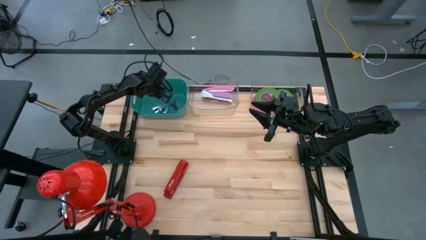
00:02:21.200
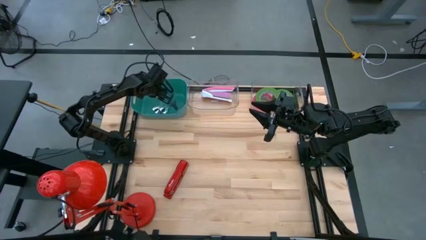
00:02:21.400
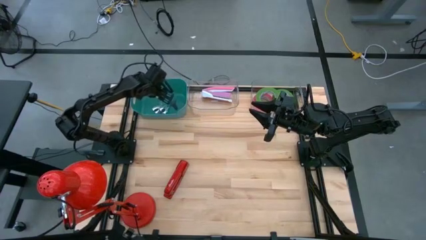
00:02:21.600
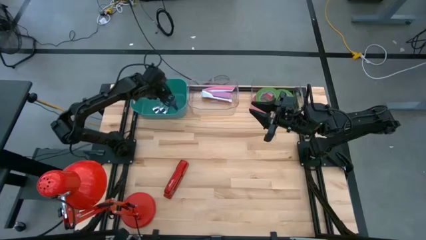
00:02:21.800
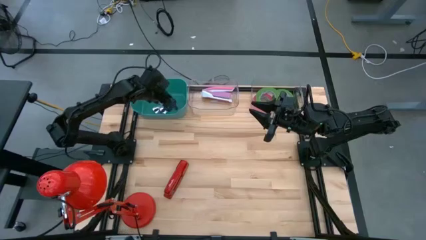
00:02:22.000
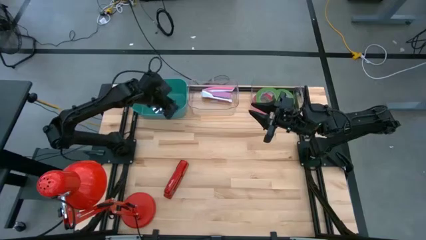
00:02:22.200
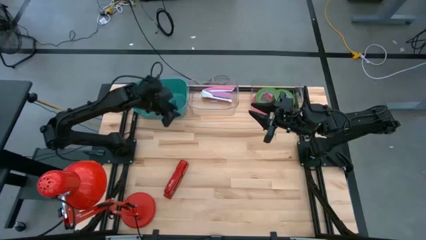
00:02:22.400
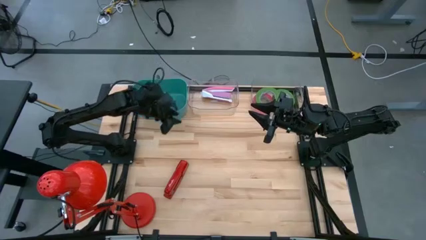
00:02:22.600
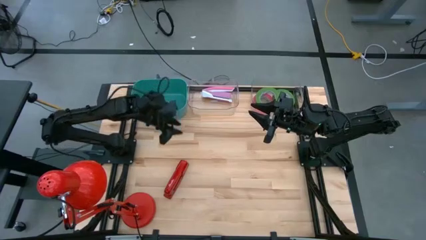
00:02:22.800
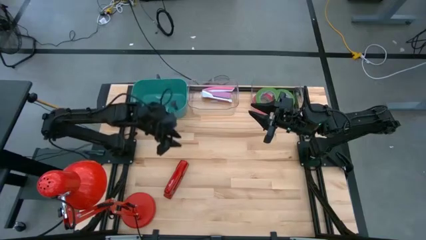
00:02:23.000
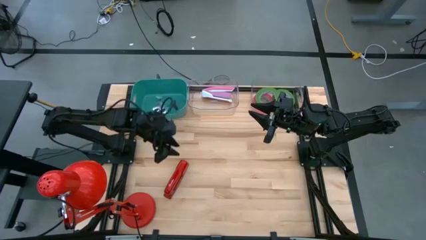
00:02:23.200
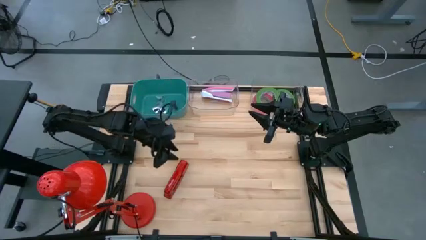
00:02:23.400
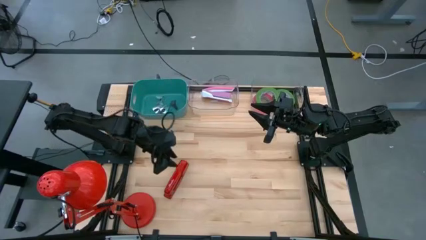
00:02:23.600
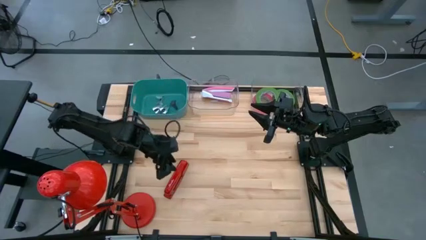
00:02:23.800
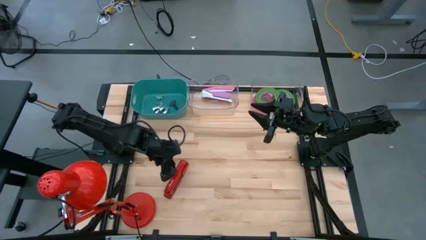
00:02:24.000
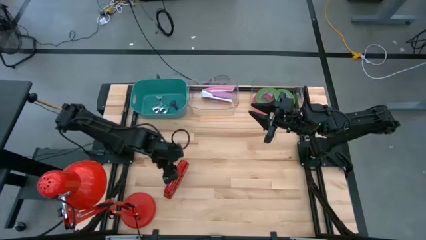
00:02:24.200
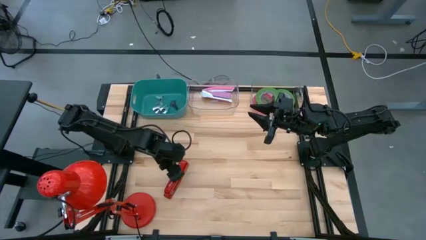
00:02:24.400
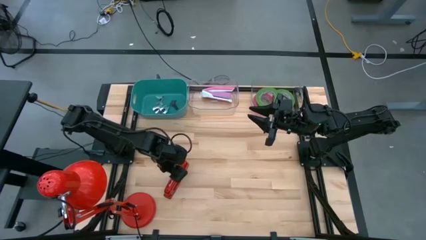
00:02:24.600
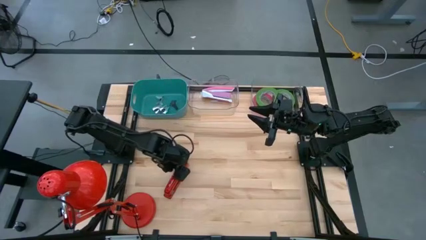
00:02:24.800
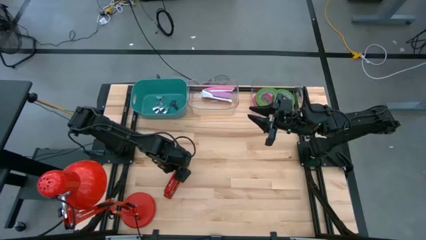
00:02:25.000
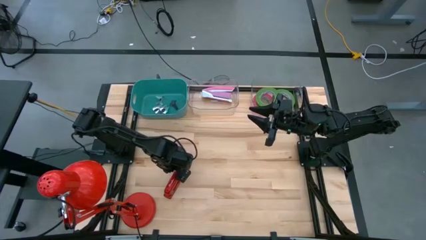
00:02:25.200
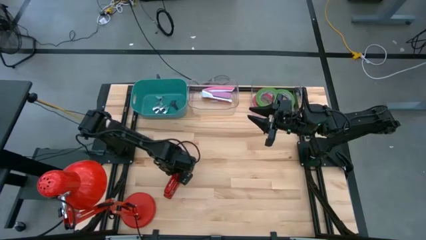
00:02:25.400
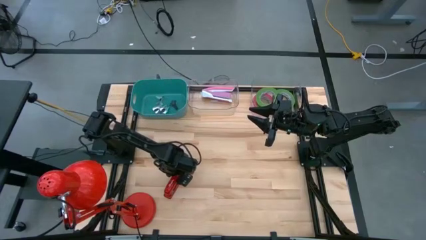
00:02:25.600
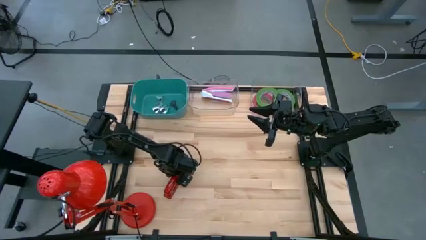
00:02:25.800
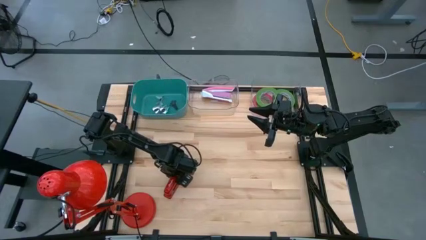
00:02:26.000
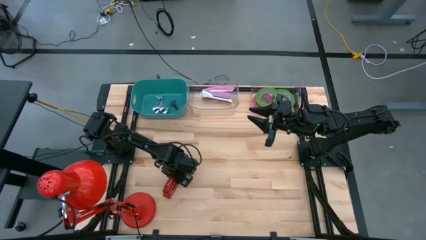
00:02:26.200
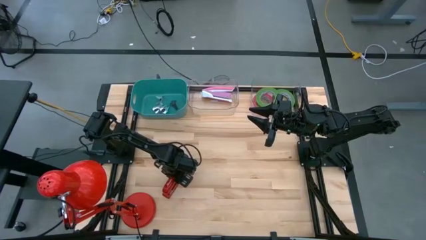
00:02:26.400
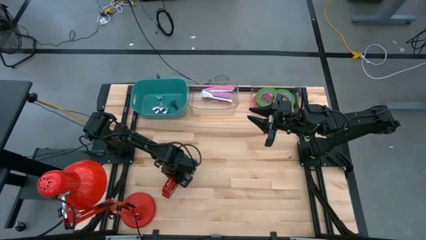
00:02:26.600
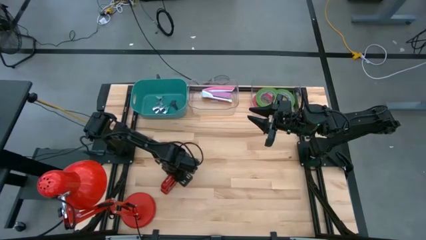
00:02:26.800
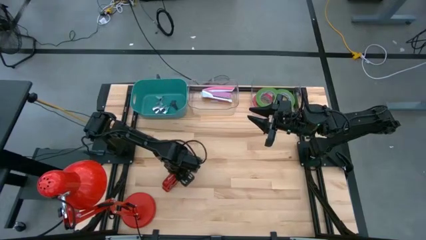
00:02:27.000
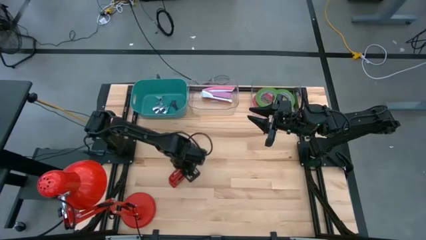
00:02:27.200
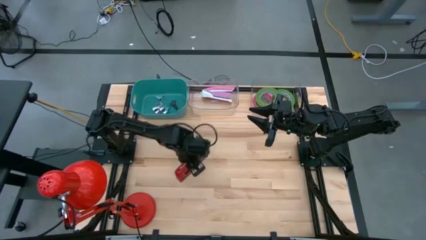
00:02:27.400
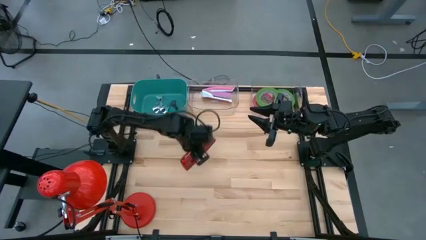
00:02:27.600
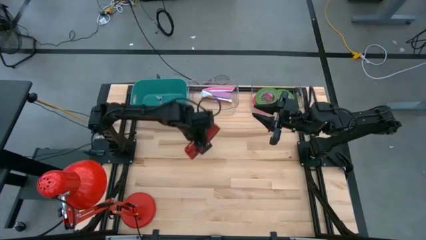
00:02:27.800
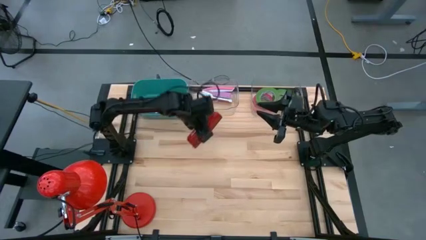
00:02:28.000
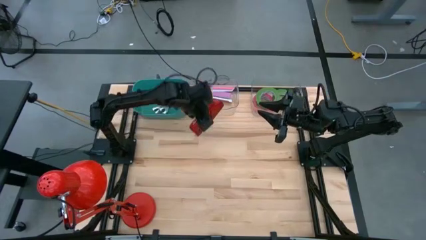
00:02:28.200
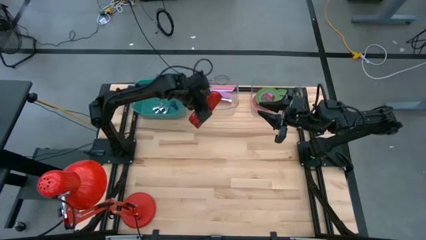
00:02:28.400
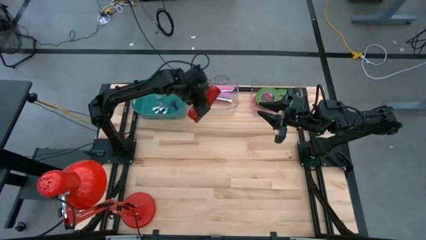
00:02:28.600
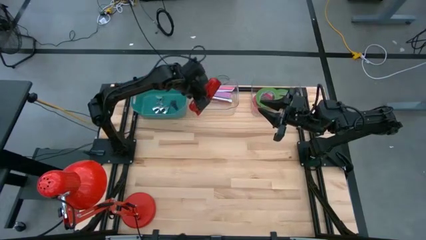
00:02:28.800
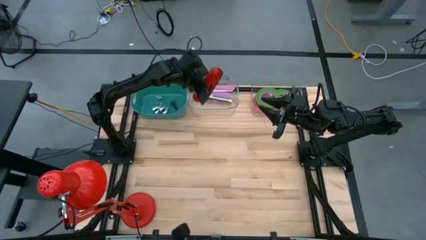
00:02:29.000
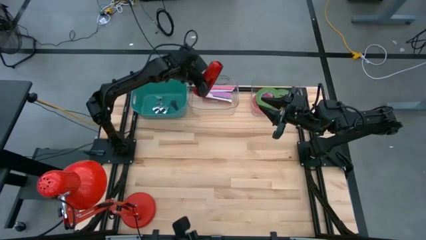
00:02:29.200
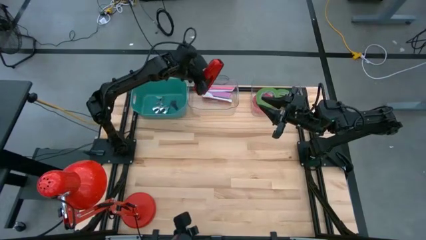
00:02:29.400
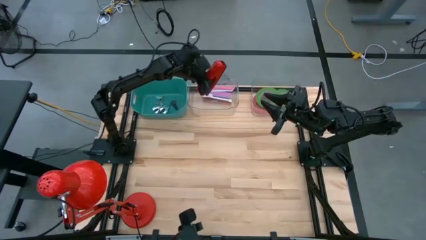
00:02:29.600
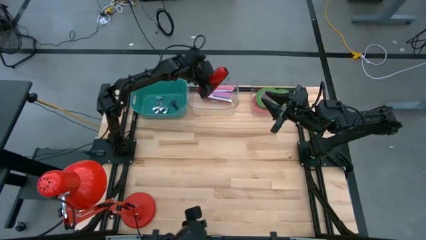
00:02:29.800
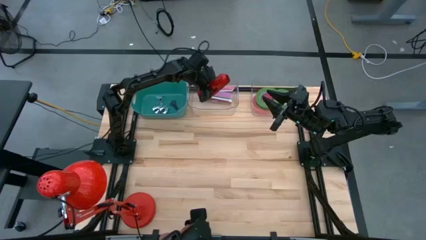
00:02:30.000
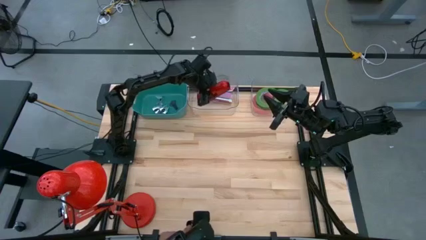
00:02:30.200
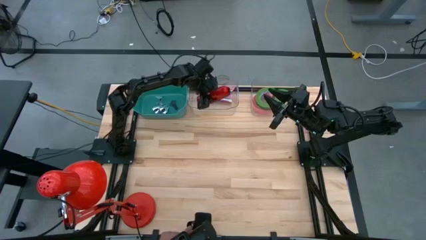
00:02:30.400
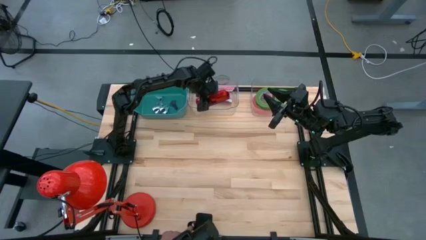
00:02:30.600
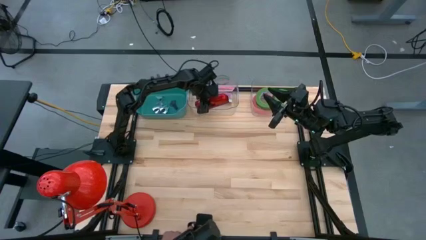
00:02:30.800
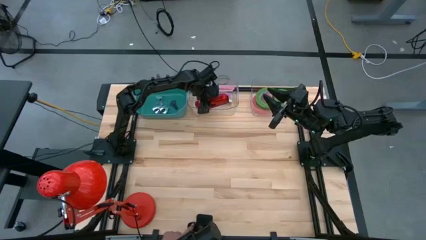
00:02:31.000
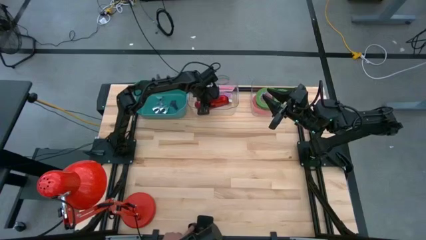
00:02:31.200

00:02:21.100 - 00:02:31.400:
Task: Pick and place Stapler, Stapler remover, tape
Put the red stapler into the left transparent bin

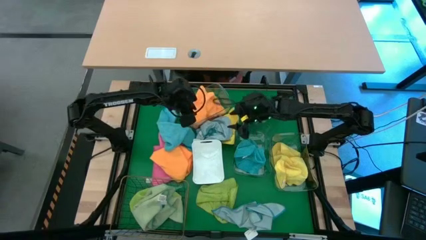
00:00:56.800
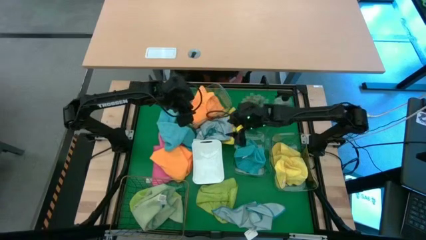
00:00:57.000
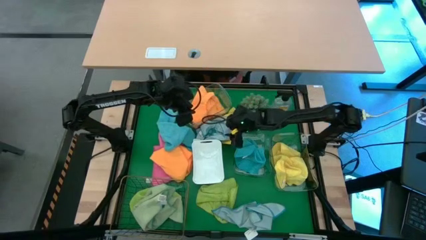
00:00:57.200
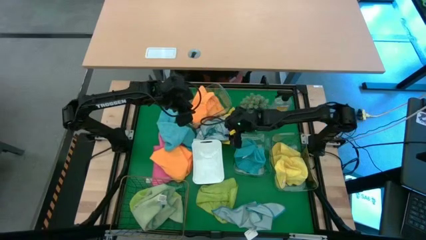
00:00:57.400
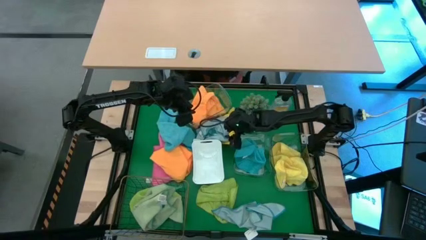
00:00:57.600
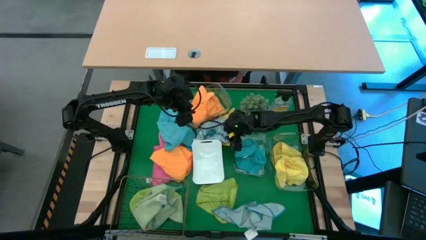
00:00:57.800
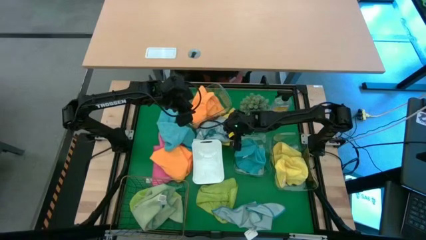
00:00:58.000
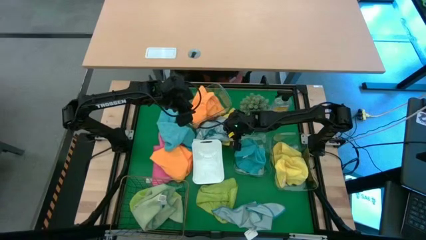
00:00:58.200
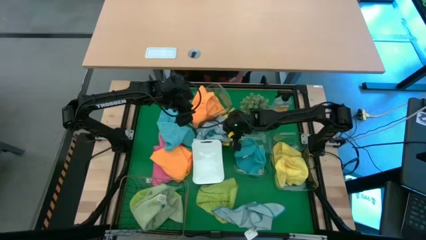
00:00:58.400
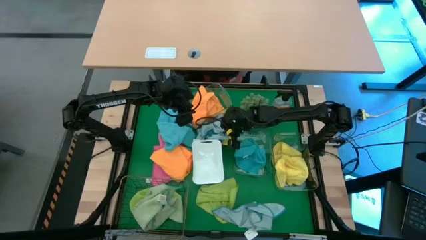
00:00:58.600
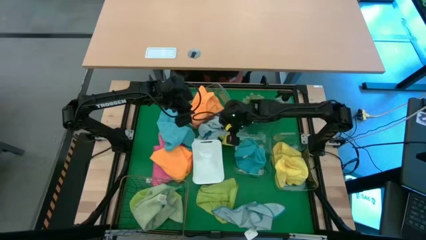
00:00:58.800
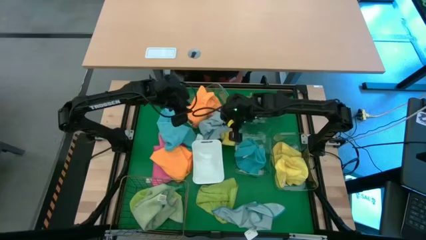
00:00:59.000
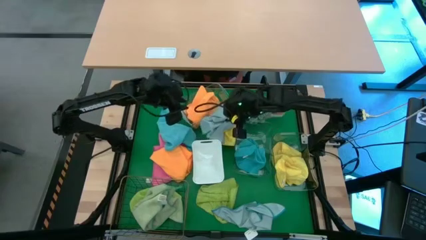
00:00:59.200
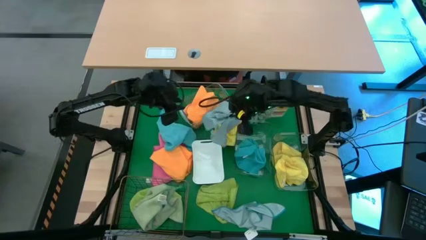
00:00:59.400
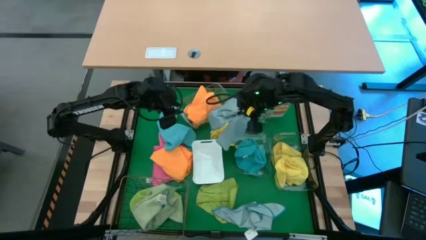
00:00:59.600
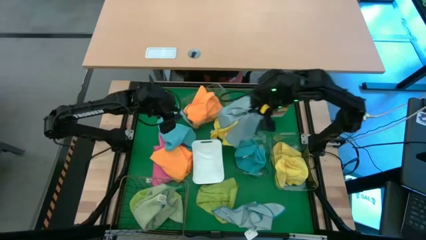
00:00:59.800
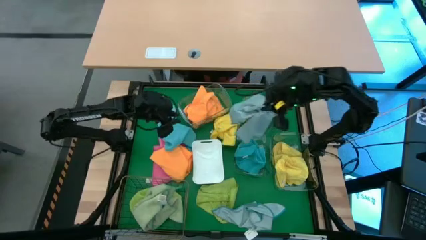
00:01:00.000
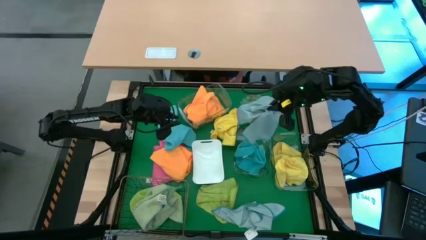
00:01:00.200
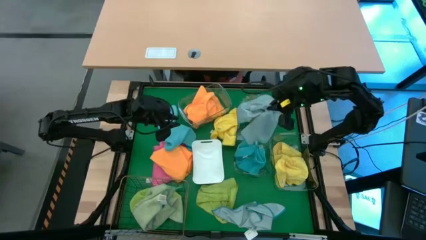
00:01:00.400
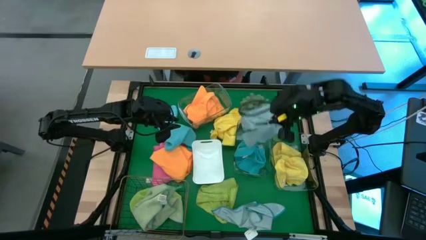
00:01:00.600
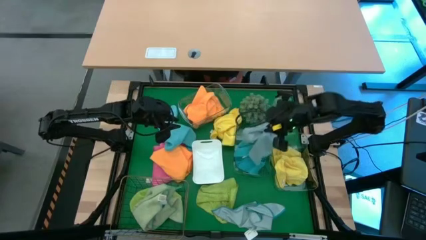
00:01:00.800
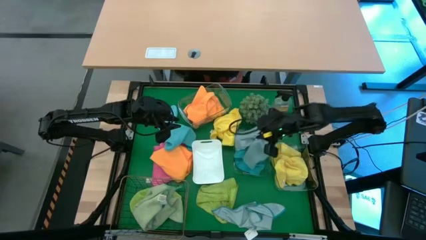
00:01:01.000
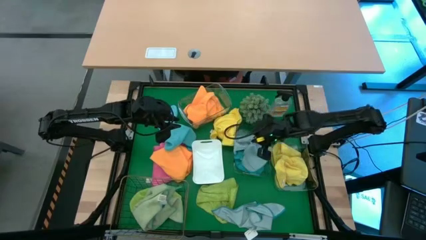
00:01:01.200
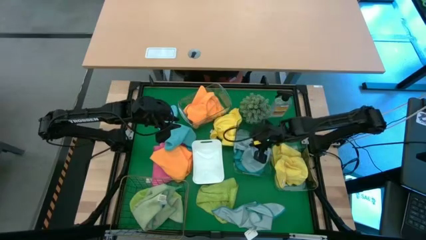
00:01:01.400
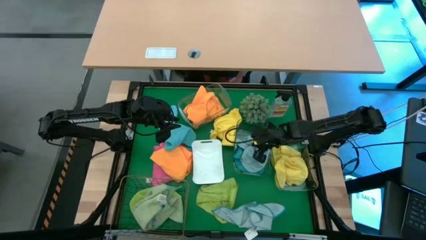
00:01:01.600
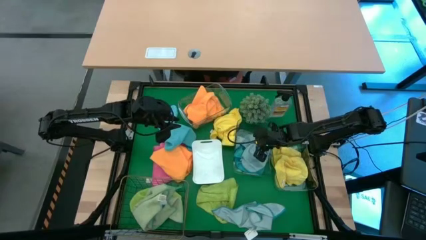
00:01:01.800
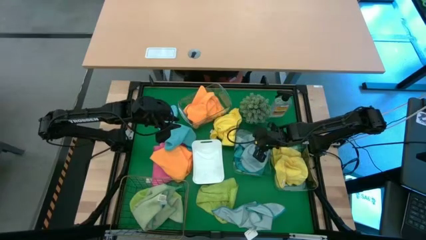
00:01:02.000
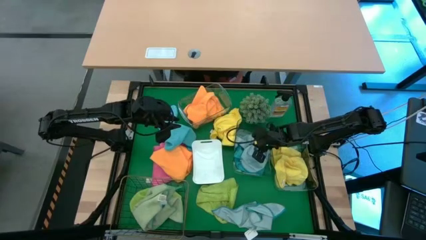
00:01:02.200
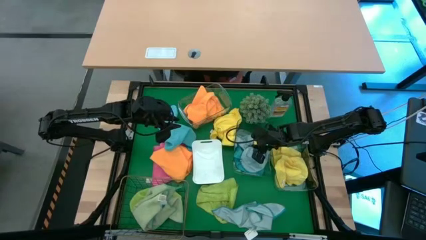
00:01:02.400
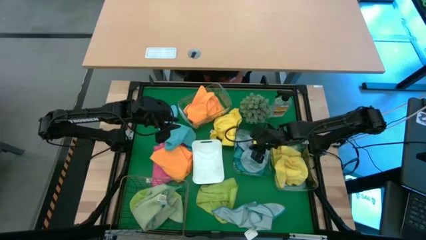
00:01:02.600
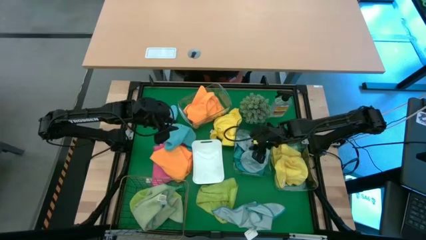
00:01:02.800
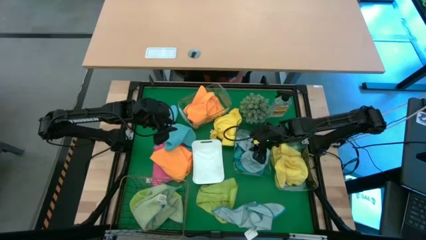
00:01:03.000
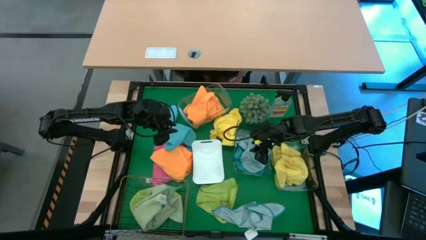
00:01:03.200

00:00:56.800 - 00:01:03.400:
Task: Sort microfiber towel by color & place in baskets
Put the light blue microfiber towel into the middle transparent bin
